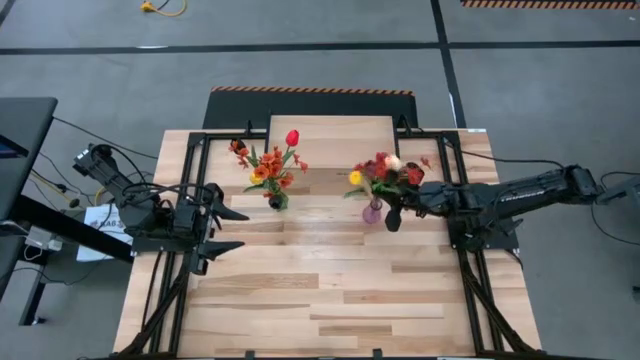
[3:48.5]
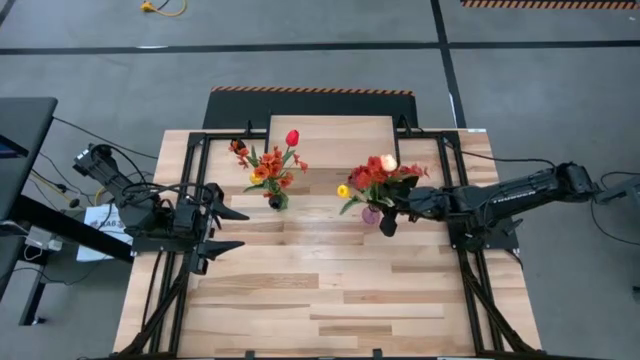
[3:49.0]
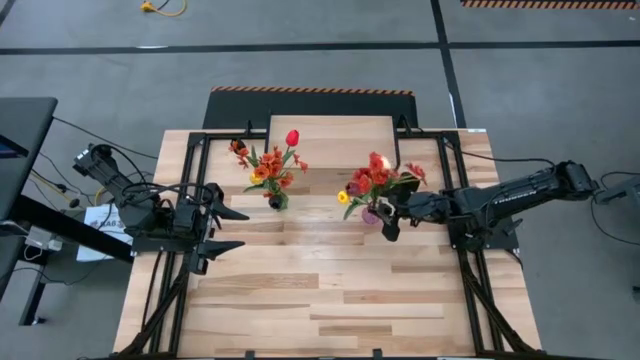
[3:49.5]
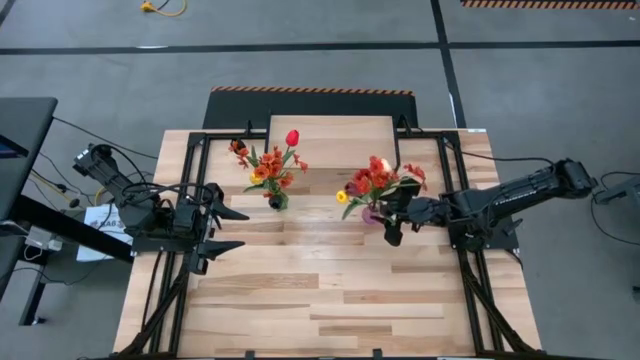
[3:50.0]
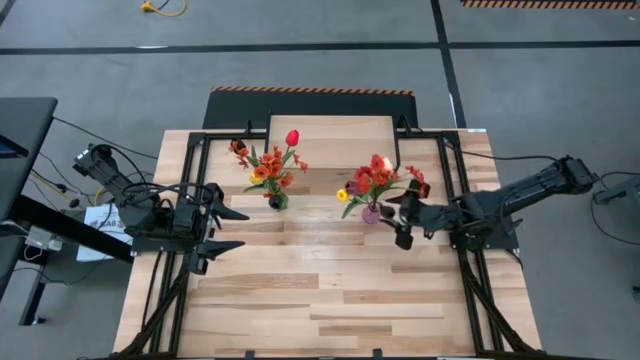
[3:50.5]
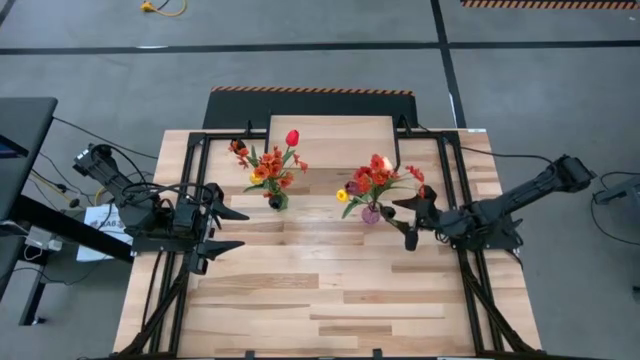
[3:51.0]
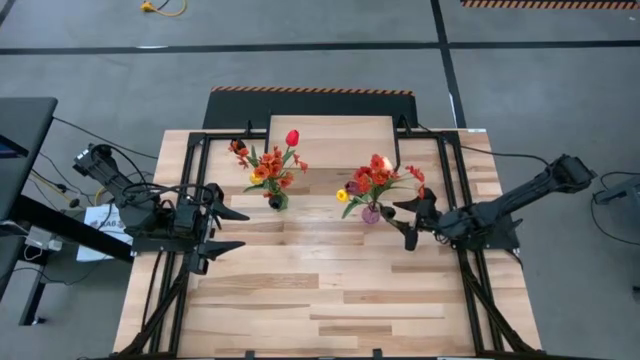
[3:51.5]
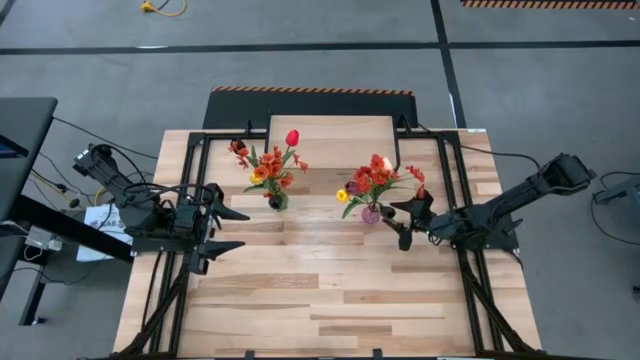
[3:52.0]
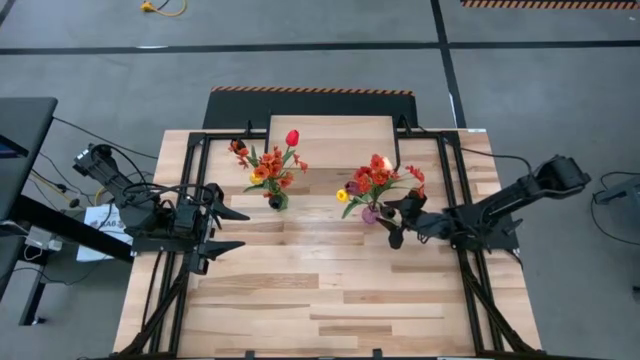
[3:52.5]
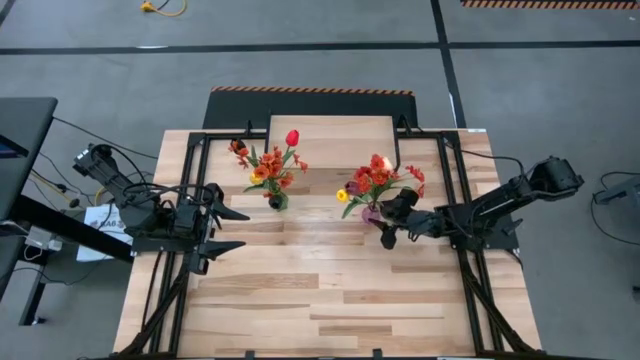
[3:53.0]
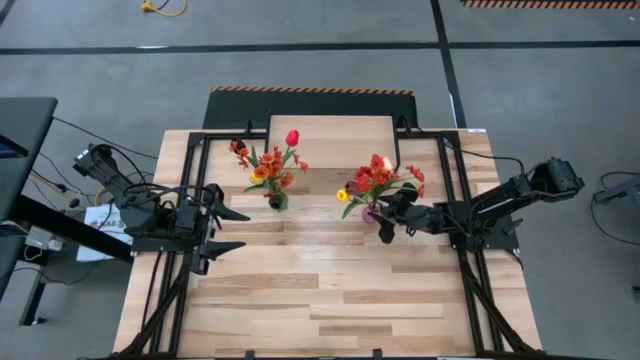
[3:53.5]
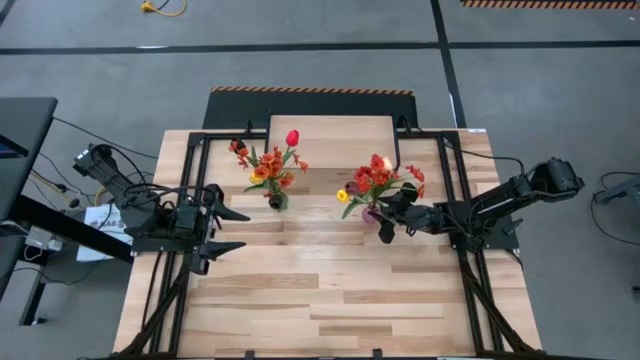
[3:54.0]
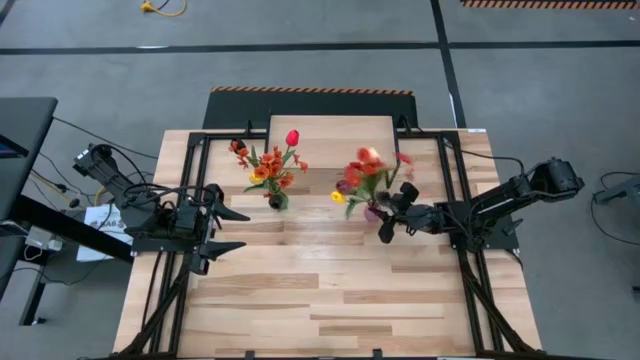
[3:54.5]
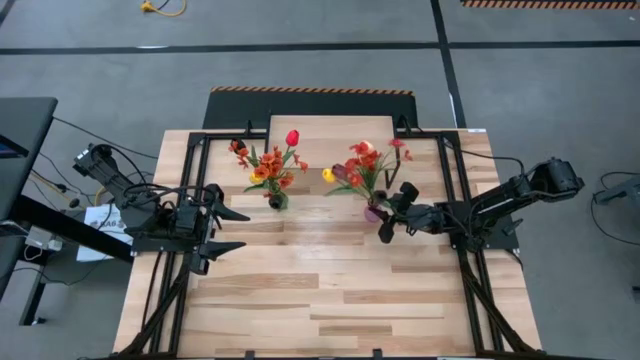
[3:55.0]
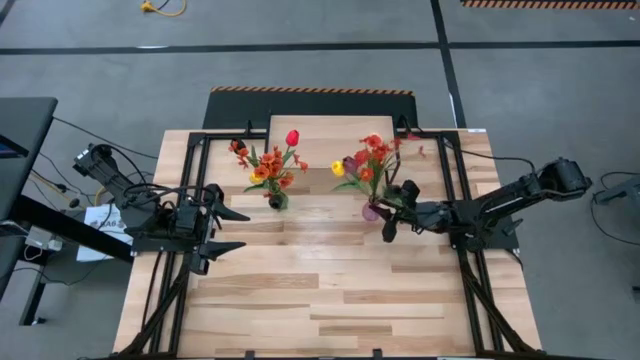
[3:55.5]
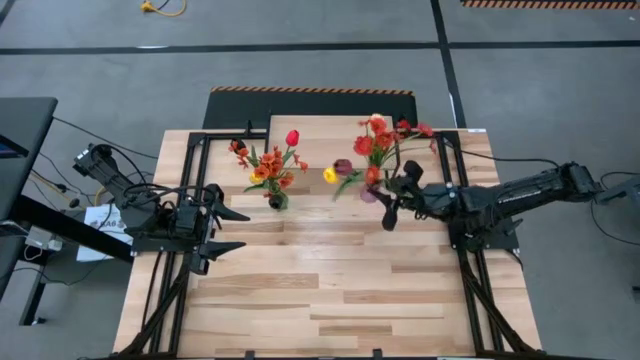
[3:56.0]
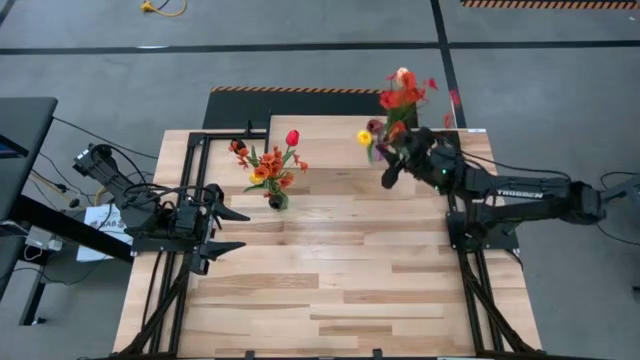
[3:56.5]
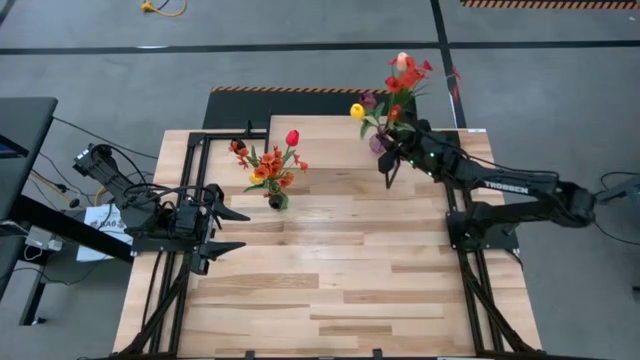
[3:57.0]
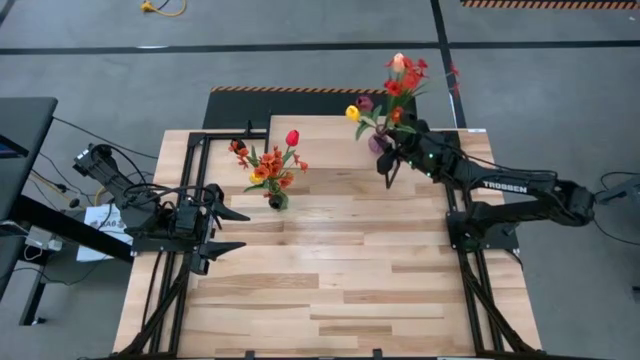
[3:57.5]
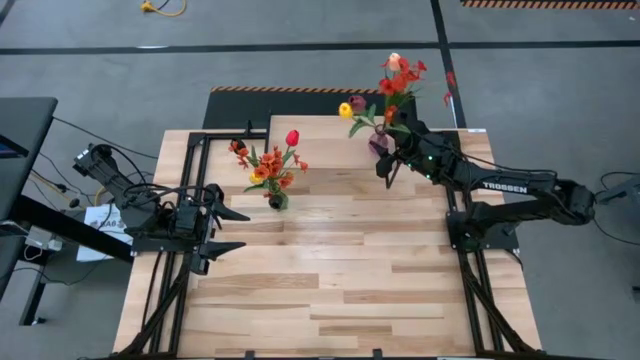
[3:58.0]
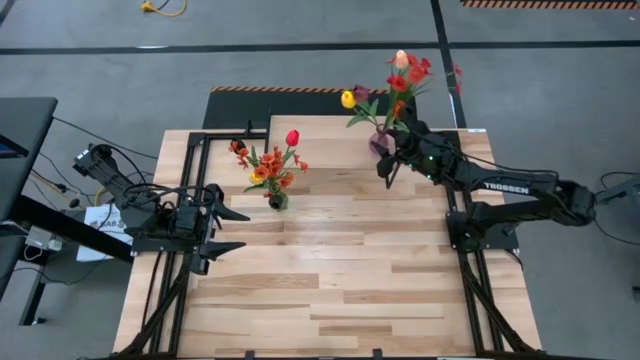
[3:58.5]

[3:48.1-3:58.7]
Task: Pick and place flowers into a vace then onto a shelf
Put the purple vase on the shelf

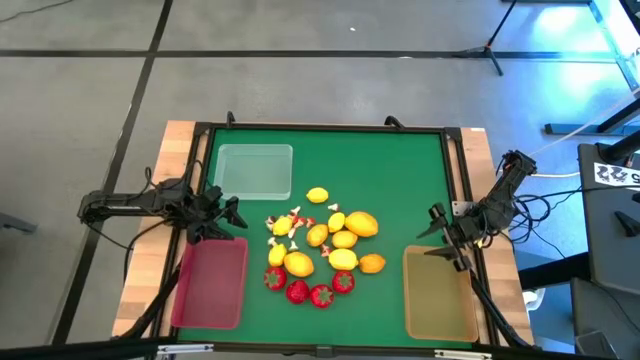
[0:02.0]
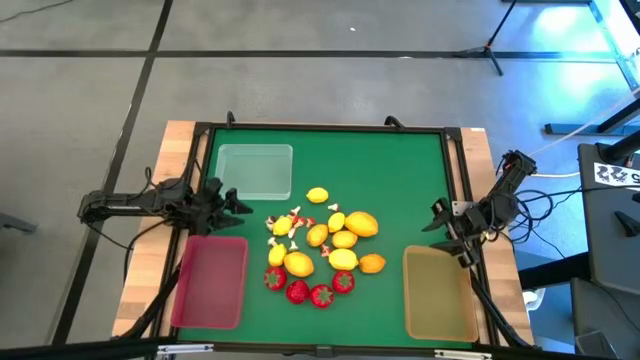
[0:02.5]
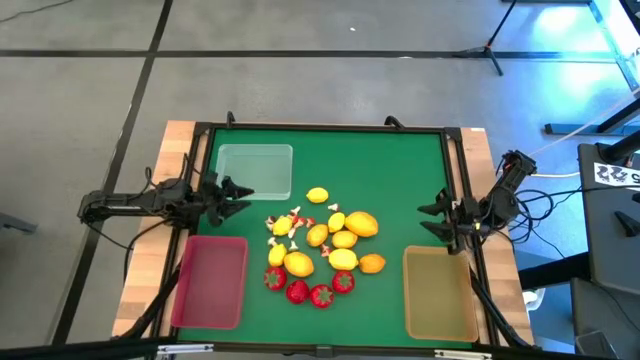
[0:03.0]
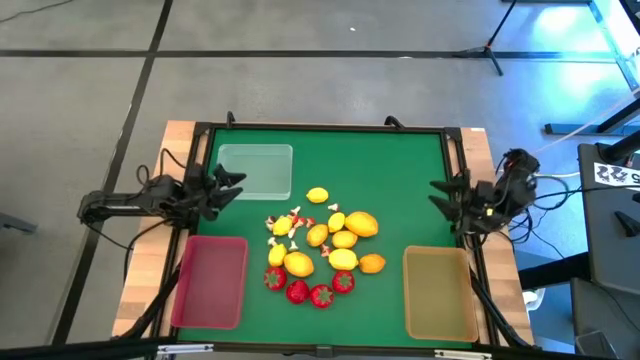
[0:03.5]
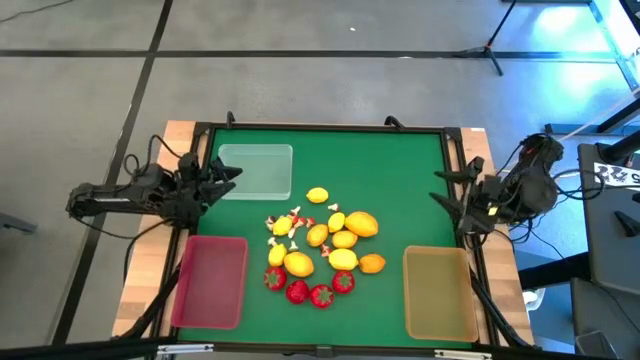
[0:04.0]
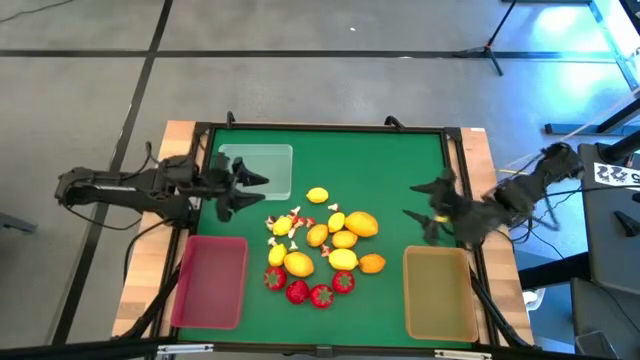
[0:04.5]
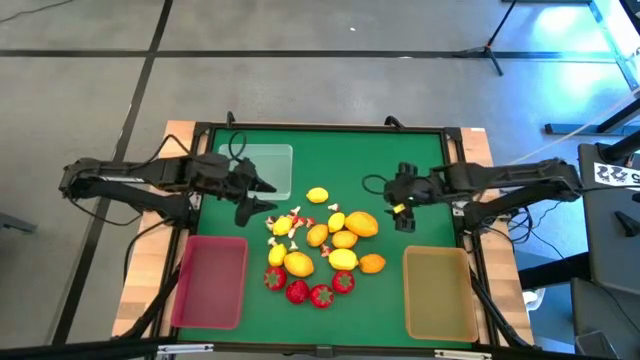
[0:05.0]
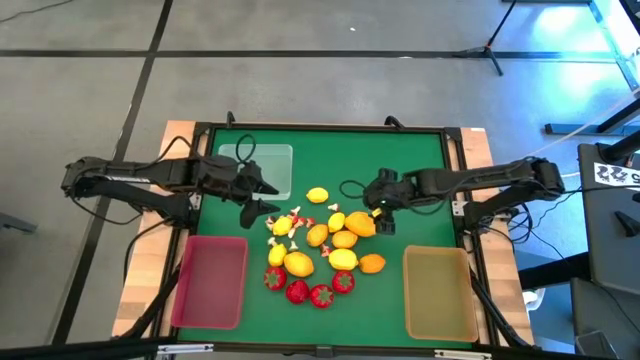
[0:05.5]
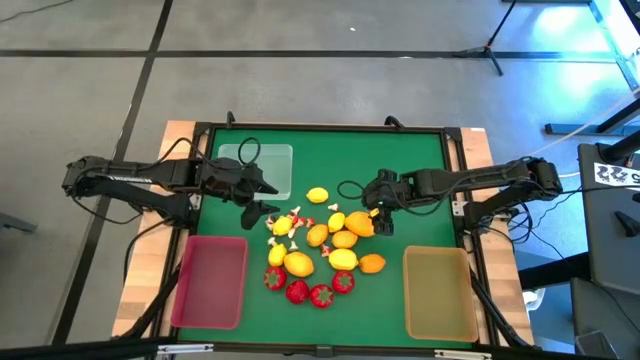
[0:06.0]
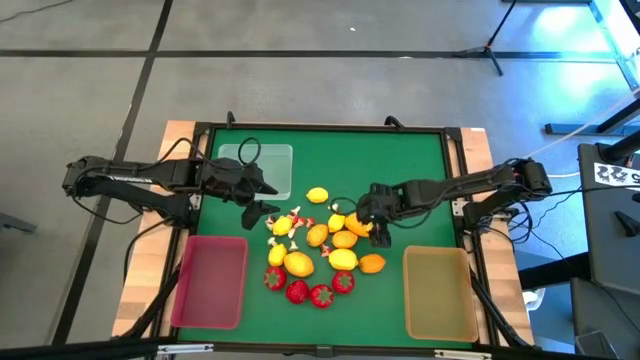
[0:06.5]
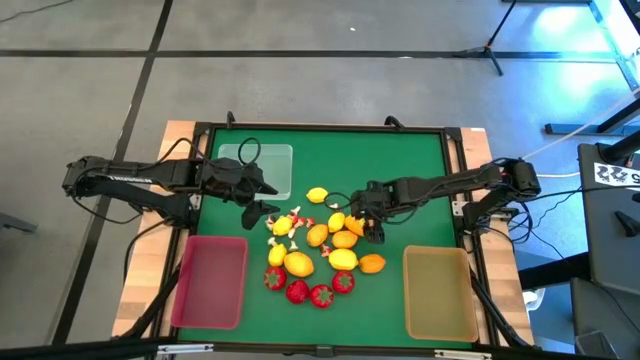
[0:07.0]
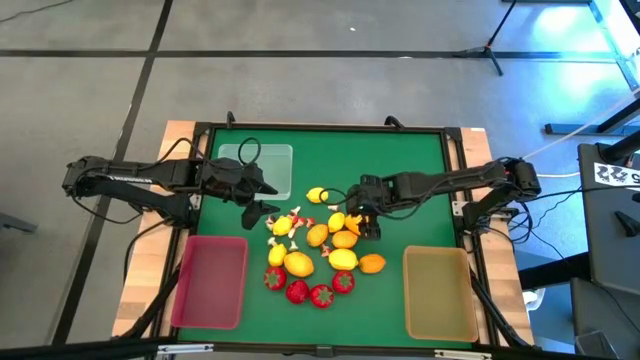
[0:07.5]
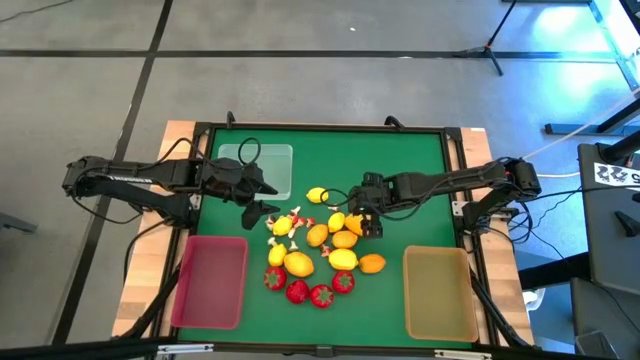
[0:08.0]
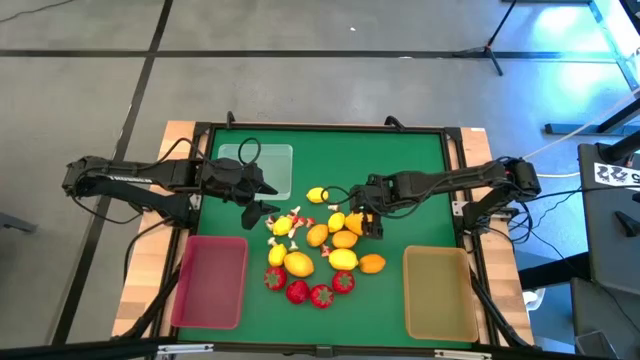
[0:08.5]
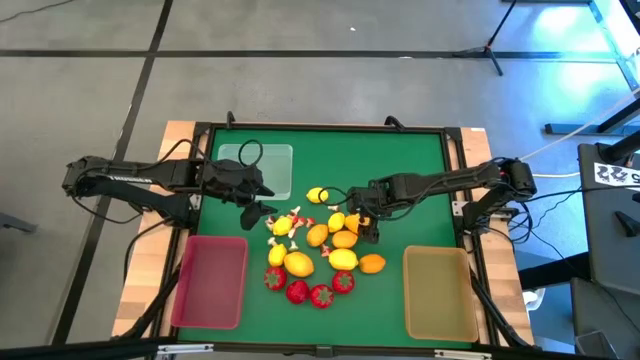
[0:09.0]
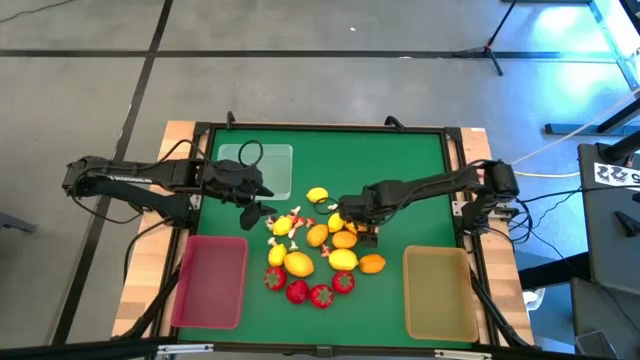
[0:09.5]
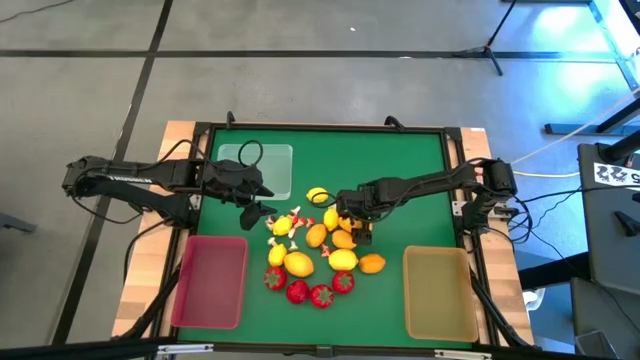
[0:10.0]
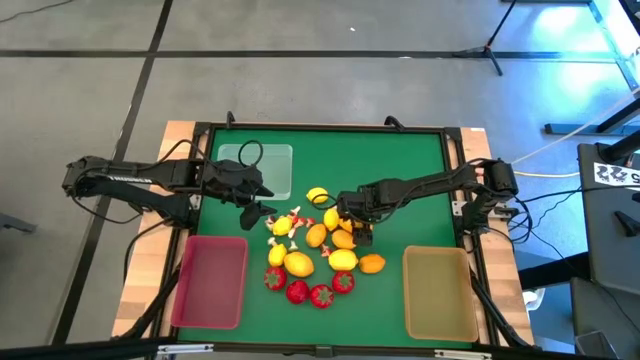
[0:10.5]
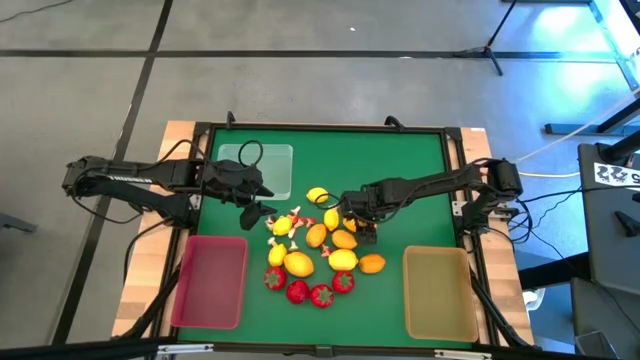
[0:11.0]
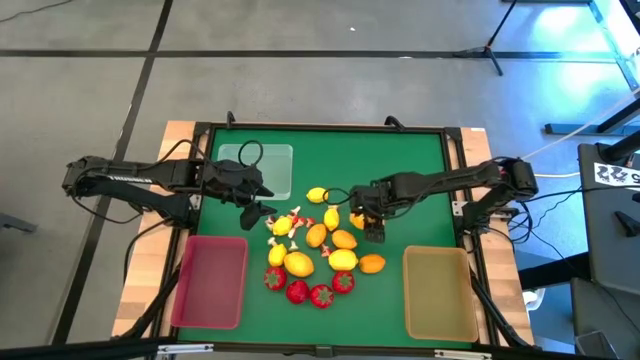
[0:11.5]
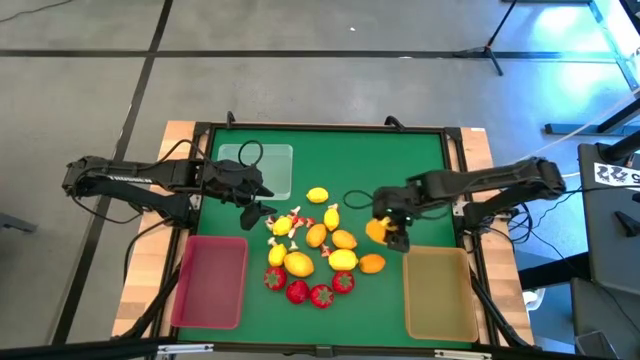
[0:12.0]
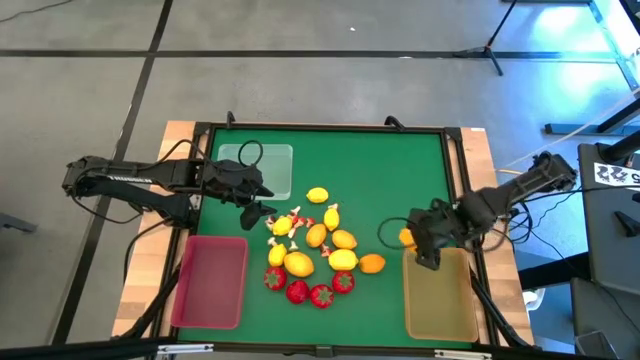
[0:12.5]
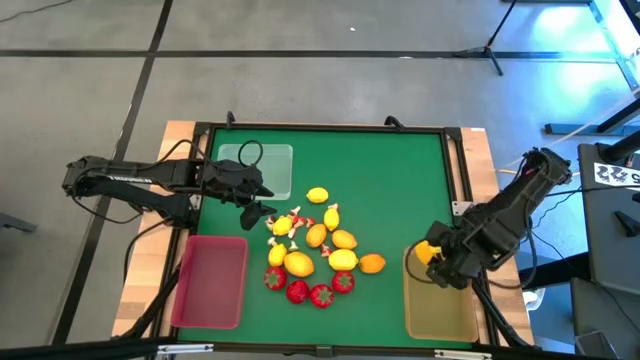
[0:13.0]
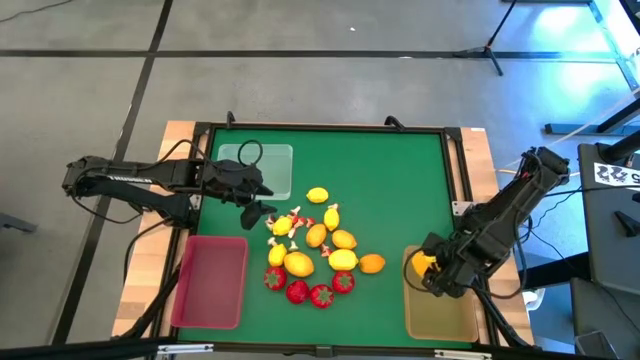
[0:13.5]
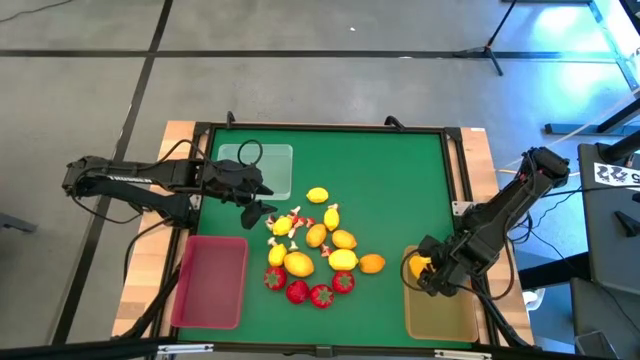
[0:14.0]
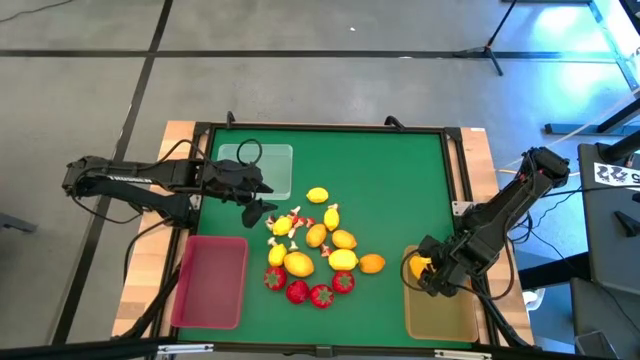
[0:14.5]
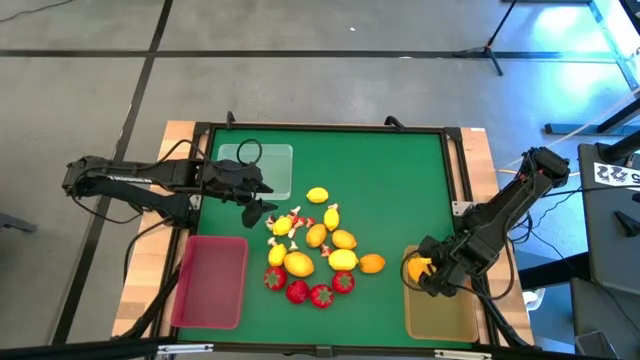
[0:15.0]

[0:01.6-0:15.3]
Task: Sort produce into baskets
Put the lemon into the orange bin
